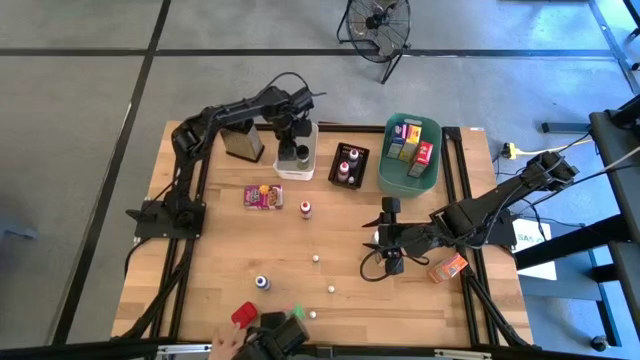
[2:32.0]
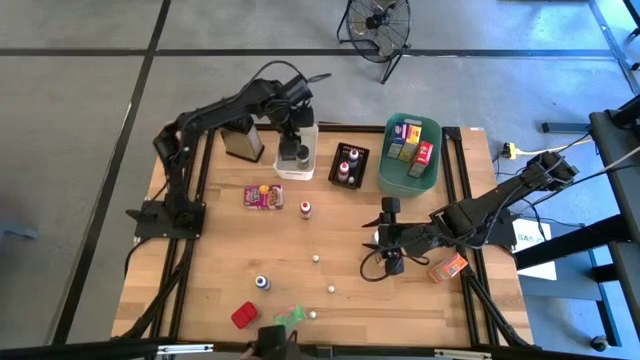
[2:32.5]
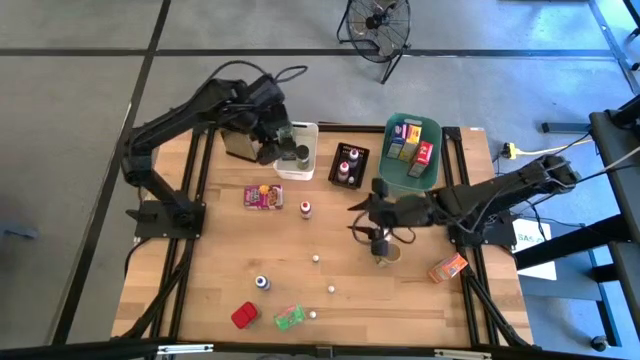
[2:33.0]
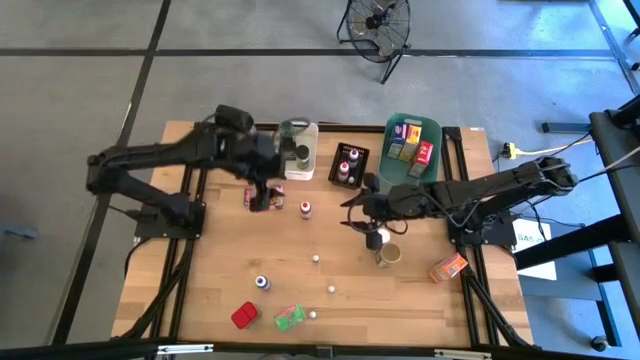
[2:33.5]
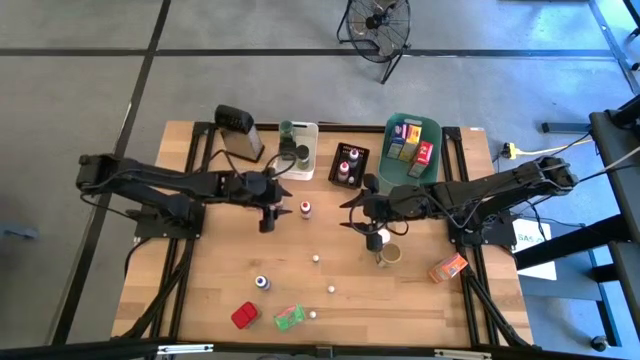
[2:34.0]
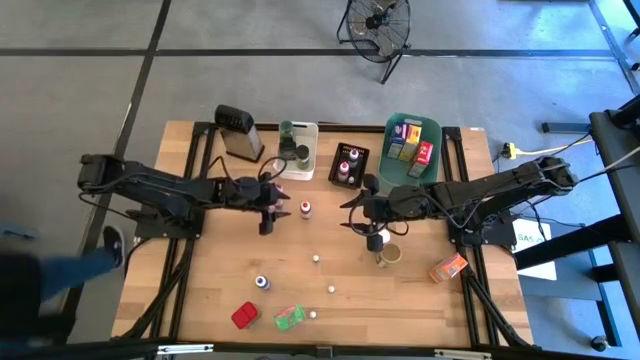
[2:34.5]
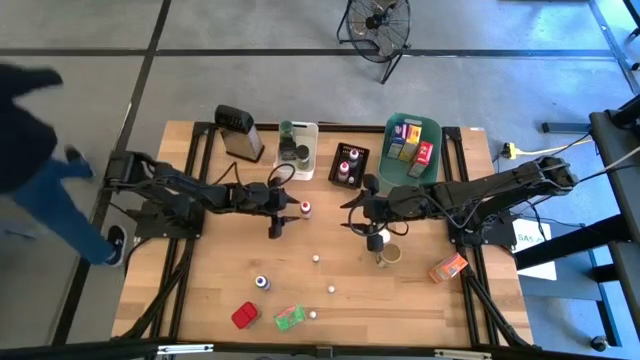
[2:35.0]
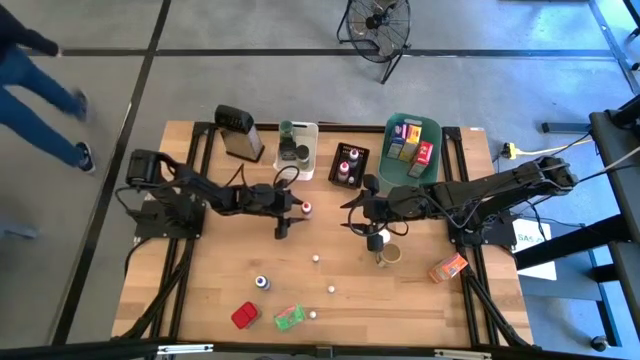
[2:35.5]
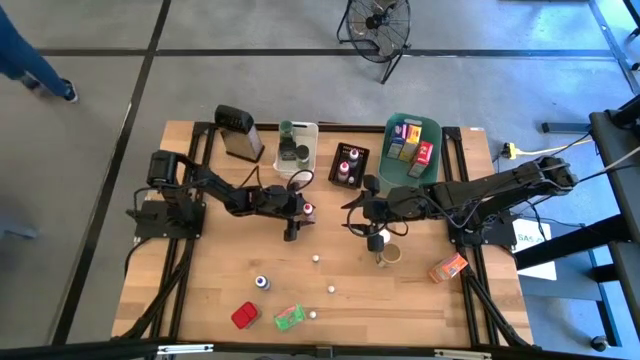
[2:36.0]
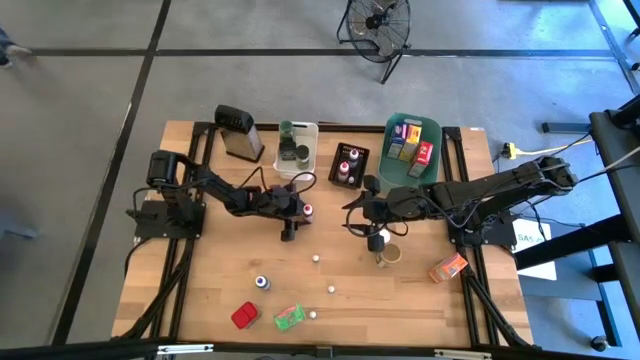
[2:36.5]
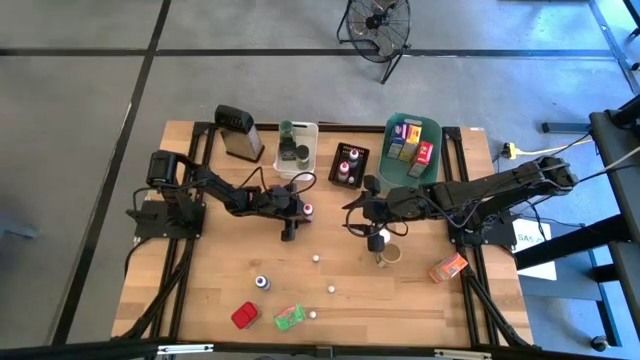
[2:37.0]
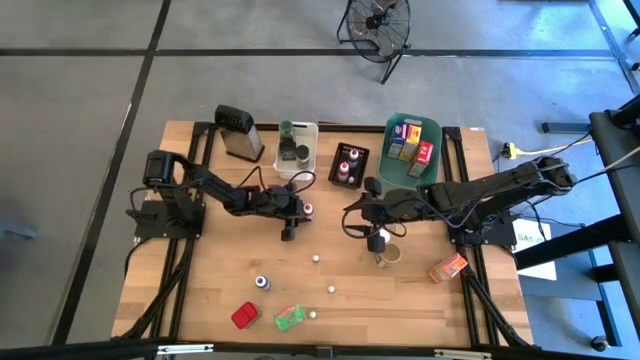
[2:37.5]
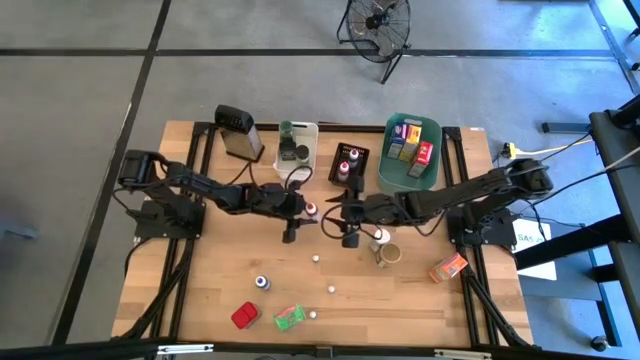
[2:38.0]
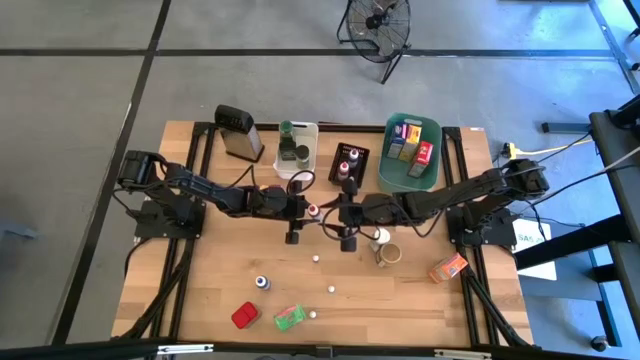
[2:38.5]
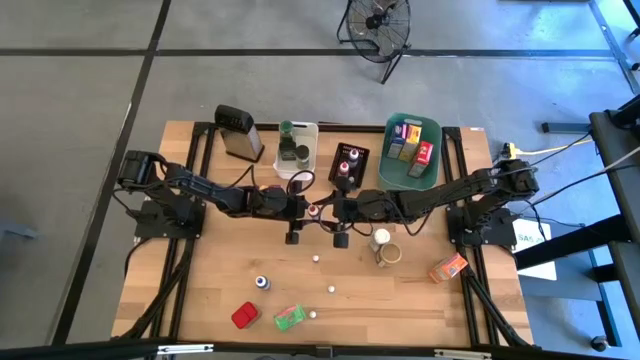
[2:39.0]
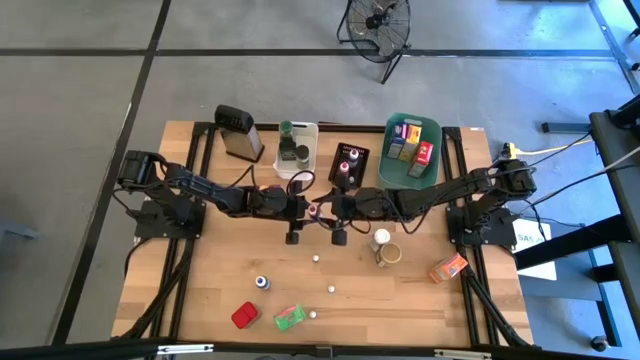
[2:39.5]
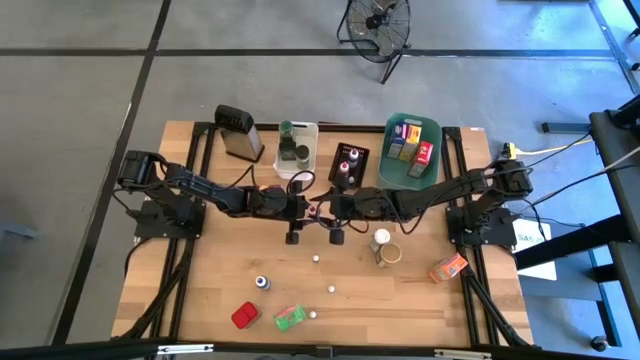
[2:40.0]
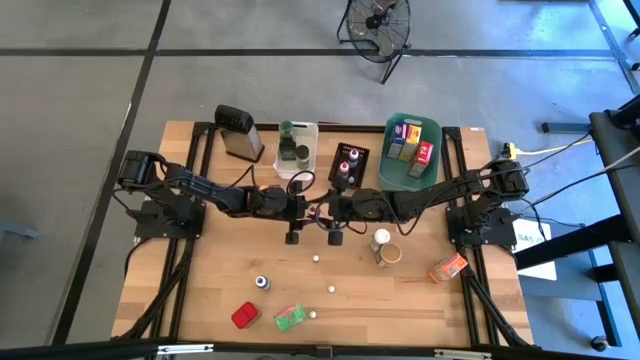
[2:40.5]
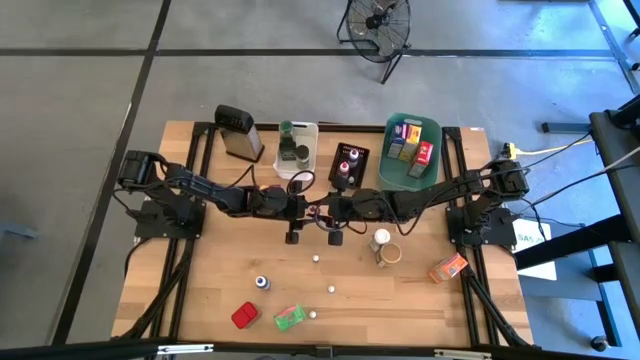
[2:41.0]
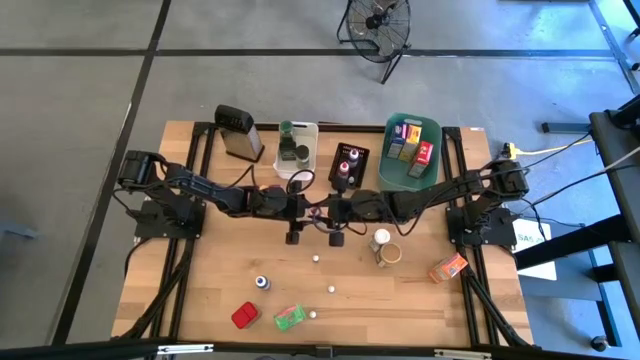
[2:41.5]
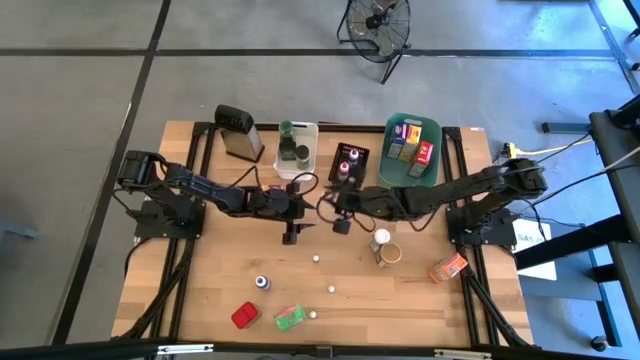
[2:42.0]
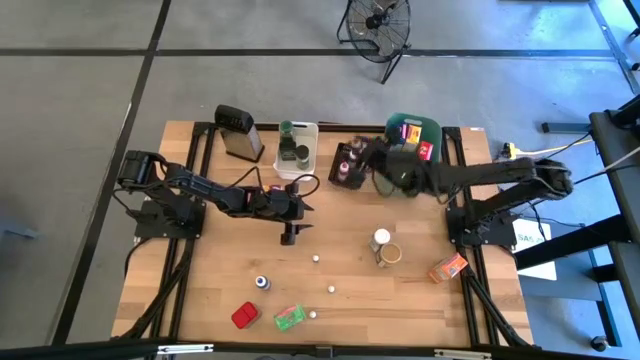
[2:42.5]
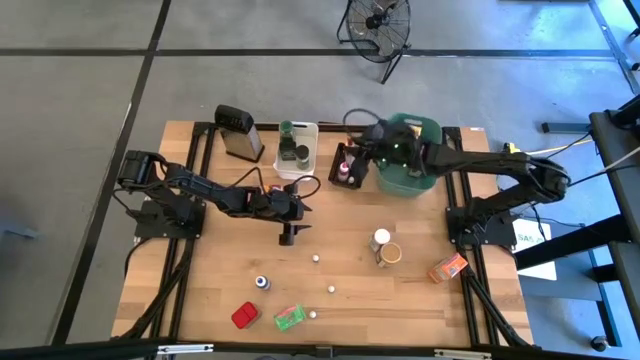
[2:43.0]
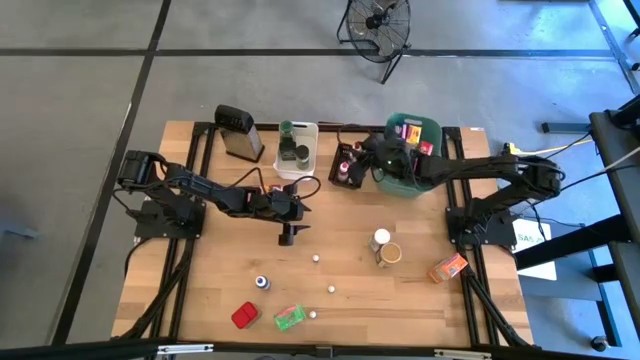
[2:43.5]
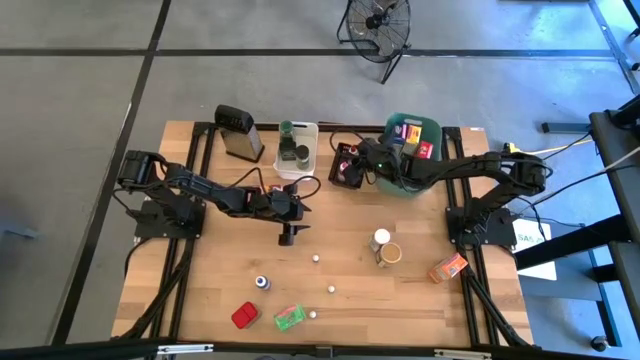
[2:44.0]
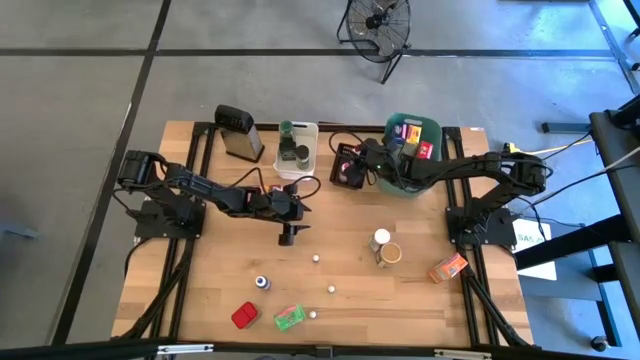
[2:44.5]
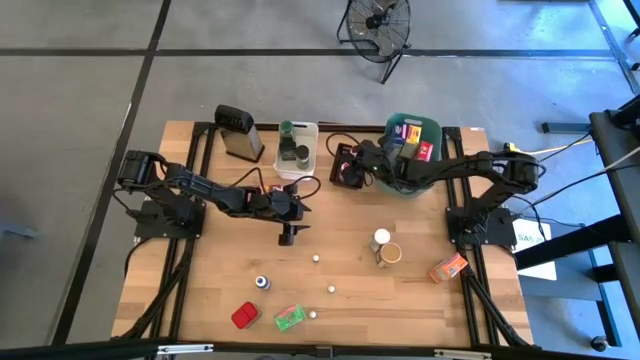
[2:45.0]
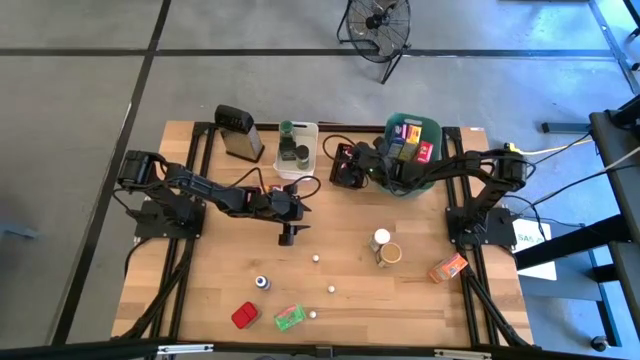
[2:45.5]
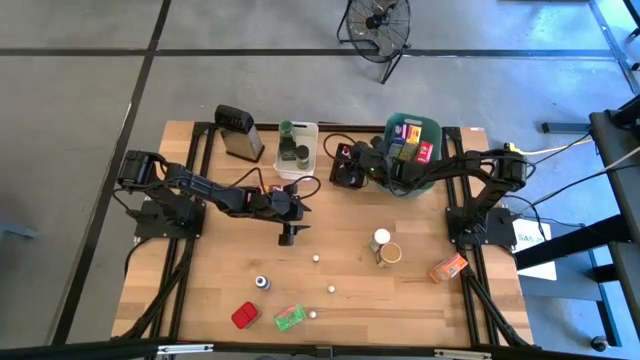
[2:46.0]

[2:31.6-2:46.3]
Task: Pick & Place Kitchen Items
Put the large red food coloring bottle into the black bin

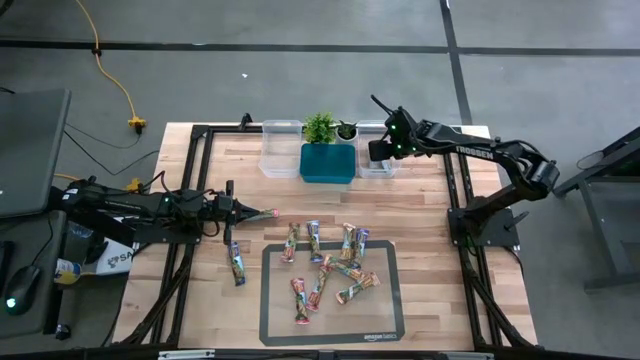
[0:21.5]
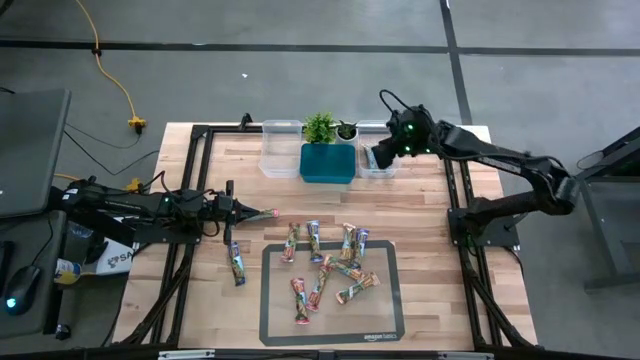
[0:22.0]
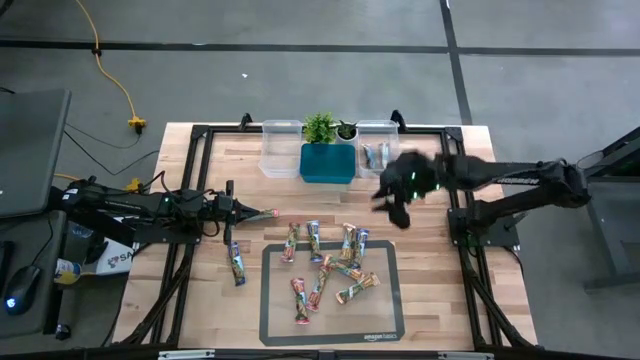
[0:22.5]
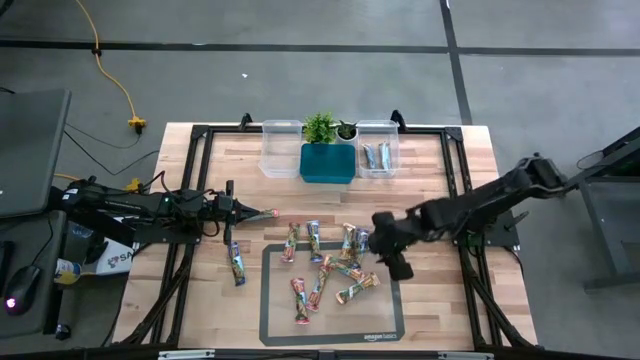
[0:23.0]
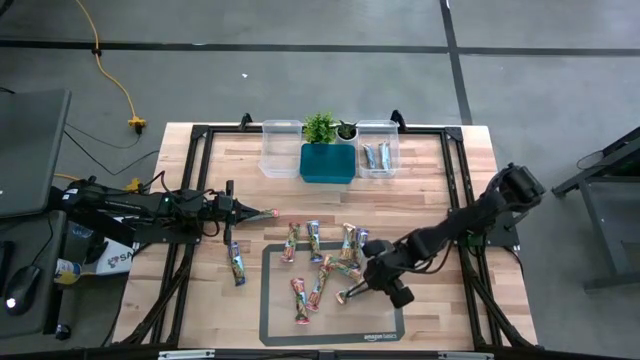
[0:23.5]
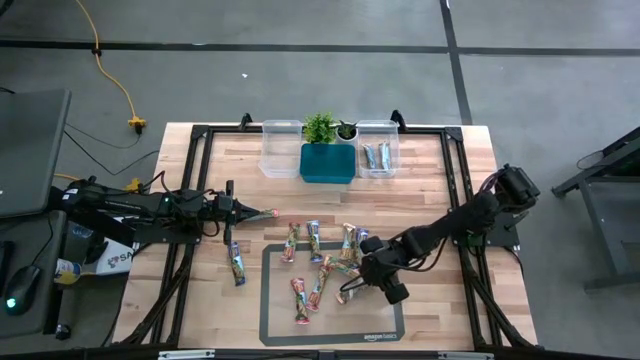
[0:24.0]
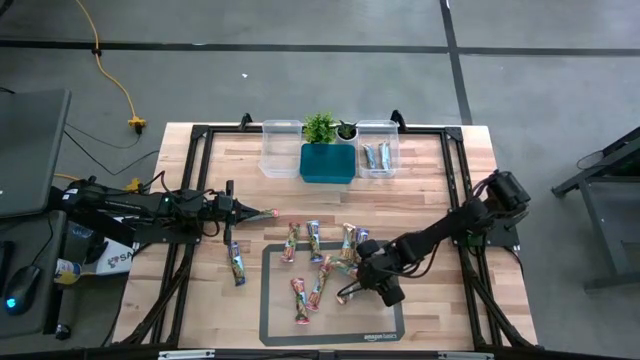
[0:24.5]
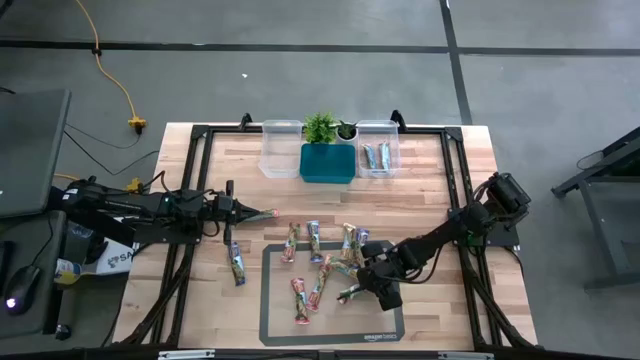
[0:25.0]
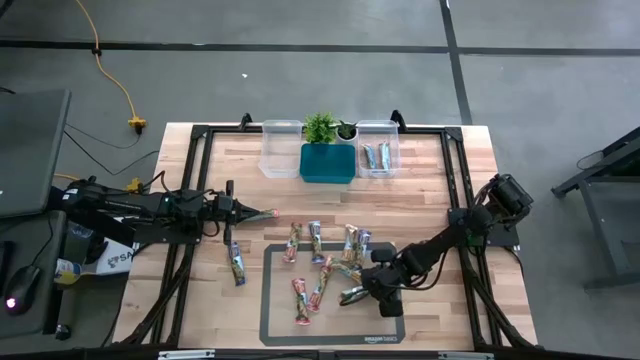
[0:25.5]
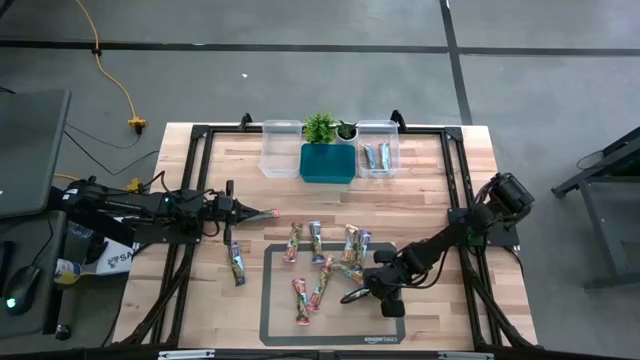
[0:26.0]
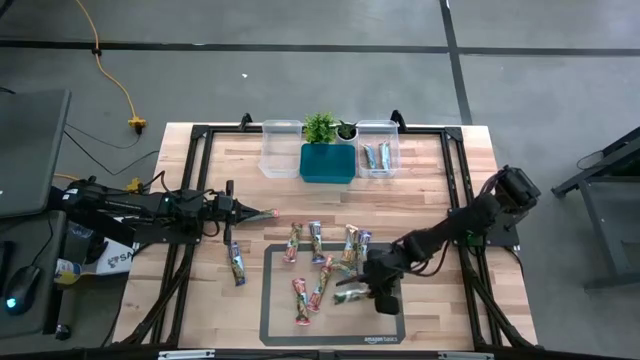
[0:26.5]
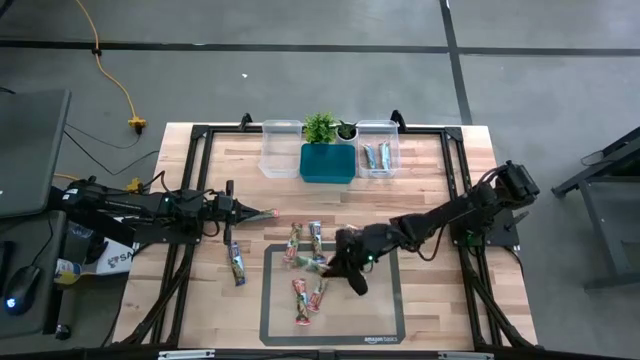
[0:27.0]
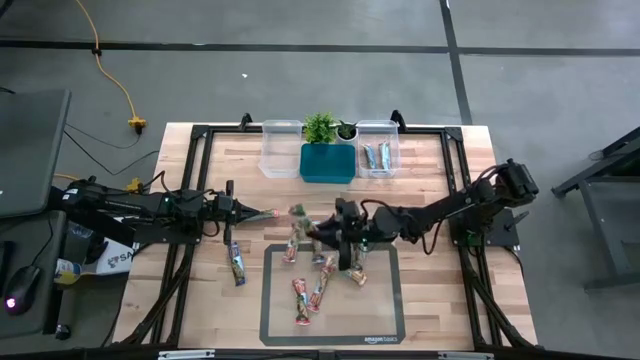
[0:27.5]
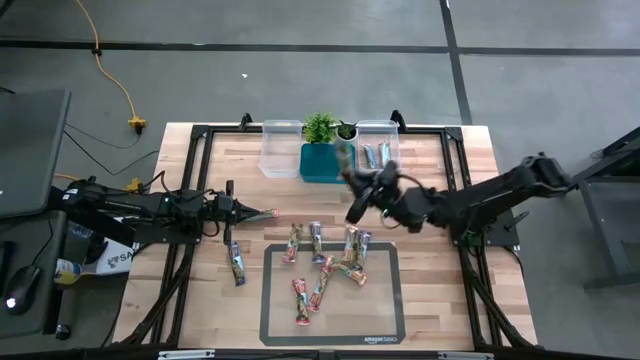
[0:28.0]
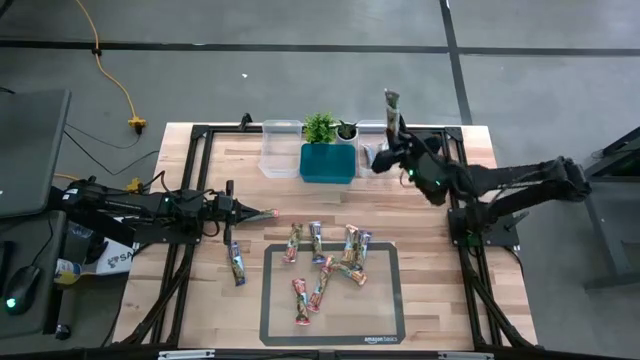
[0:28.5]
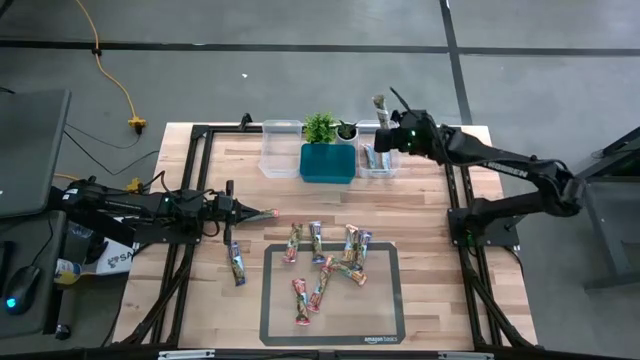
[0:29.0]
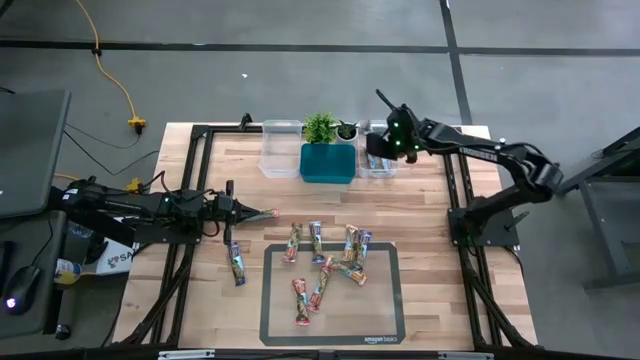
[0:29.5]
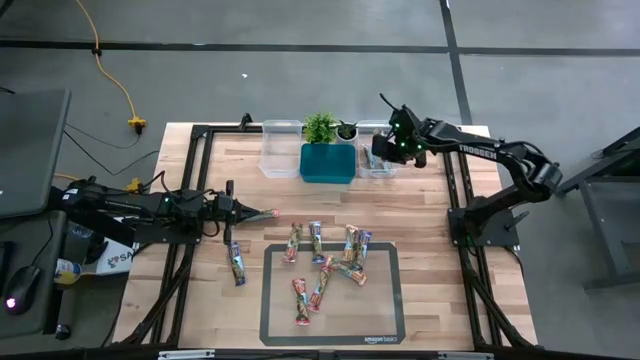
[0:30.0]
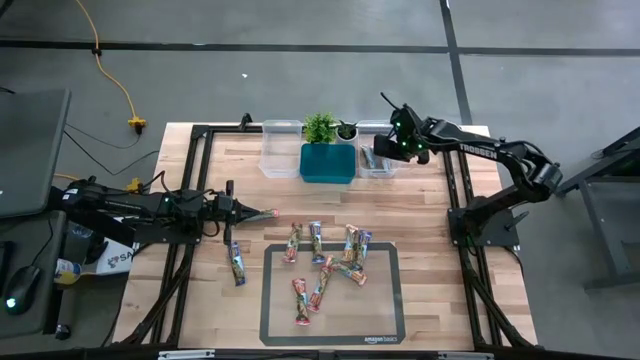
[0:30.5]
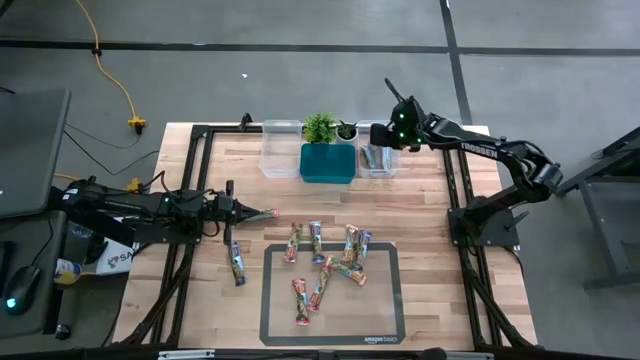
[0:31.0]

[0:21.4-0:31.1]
Task: Pick and place Granola Bars by type
Put the yellow granola bar into the right transparent bin
